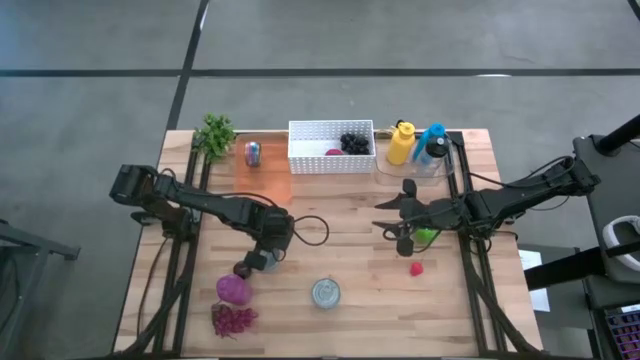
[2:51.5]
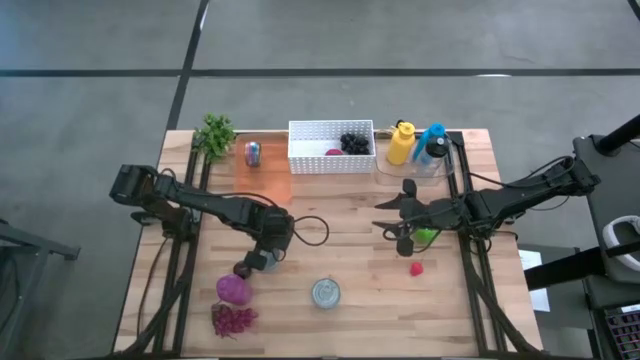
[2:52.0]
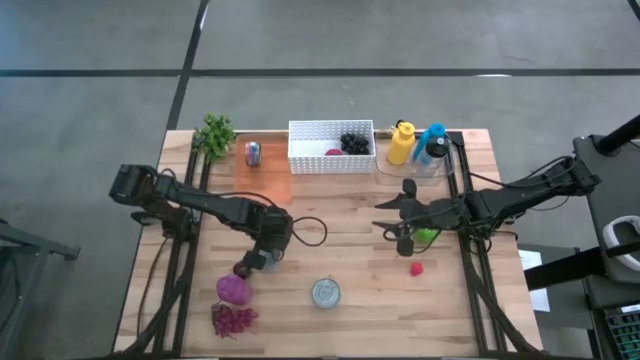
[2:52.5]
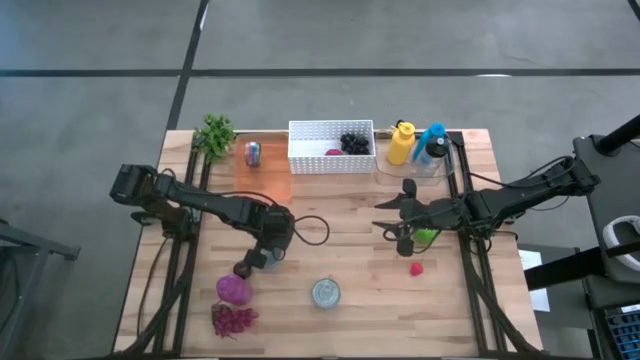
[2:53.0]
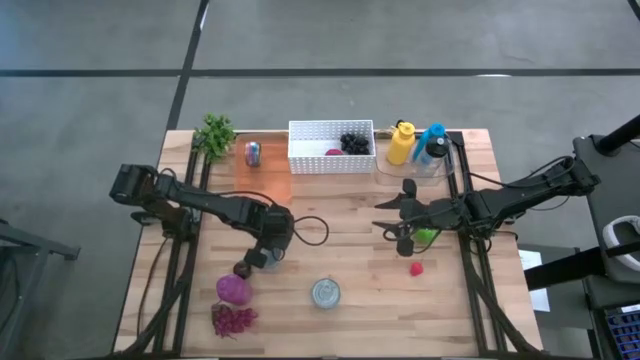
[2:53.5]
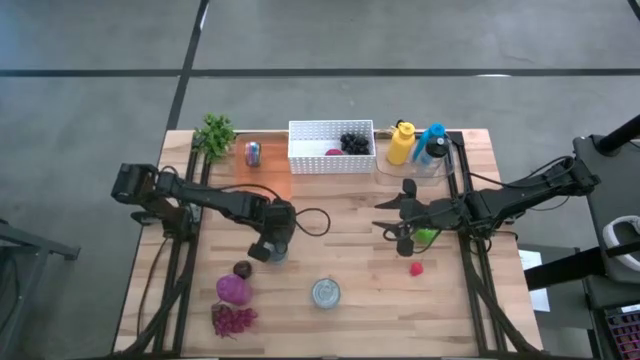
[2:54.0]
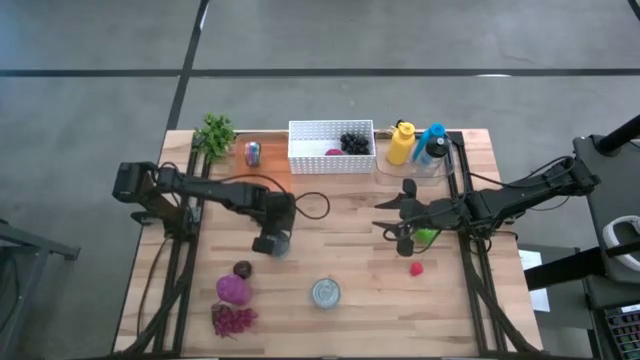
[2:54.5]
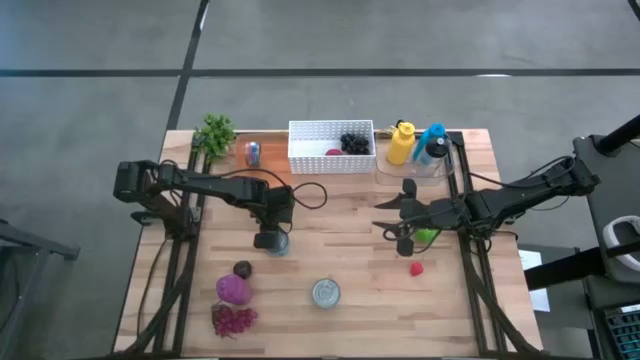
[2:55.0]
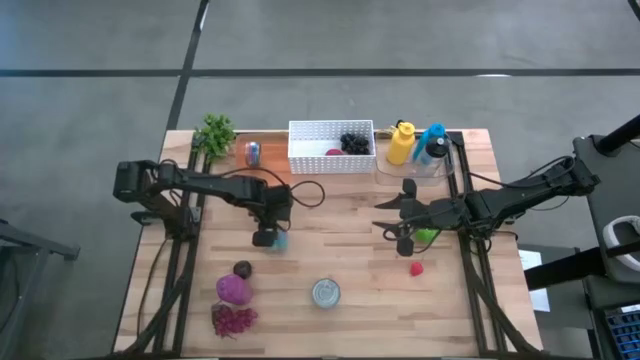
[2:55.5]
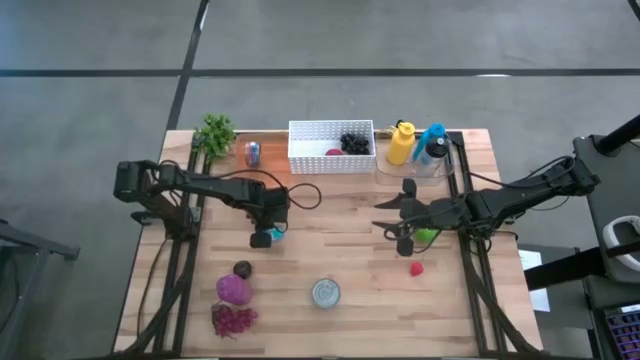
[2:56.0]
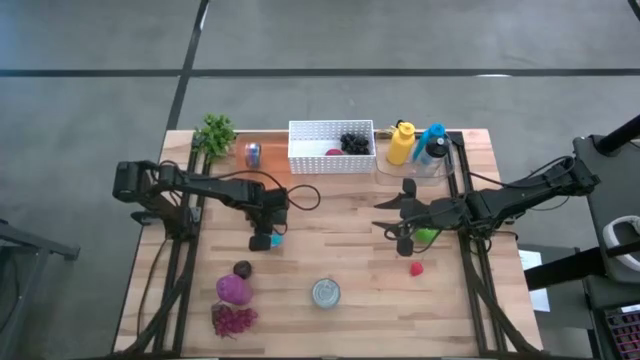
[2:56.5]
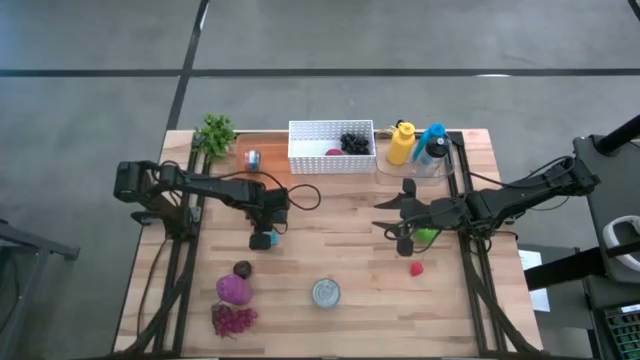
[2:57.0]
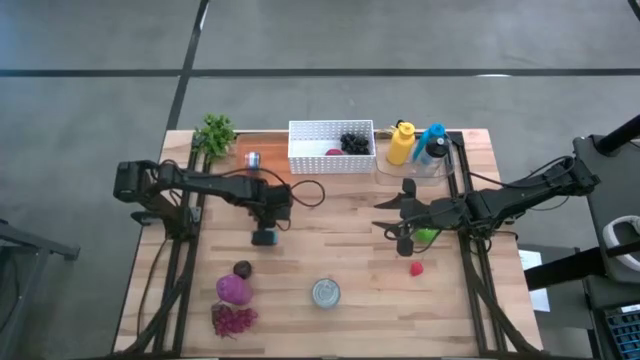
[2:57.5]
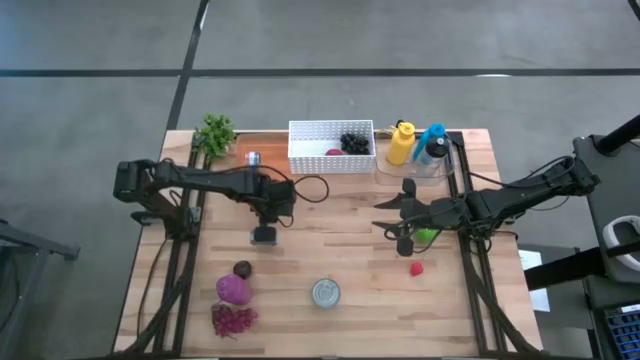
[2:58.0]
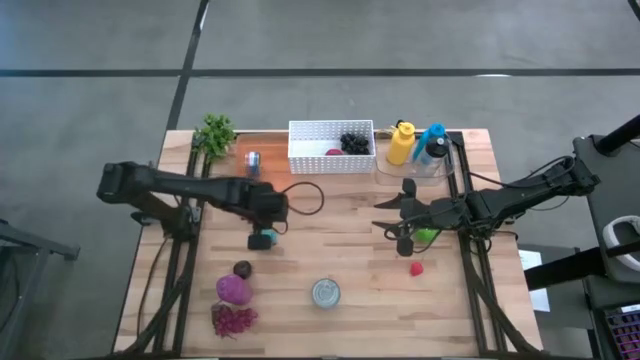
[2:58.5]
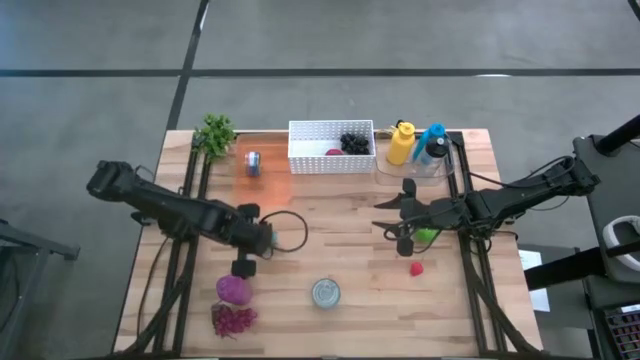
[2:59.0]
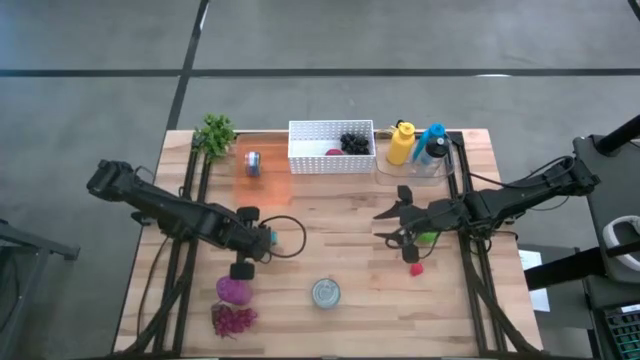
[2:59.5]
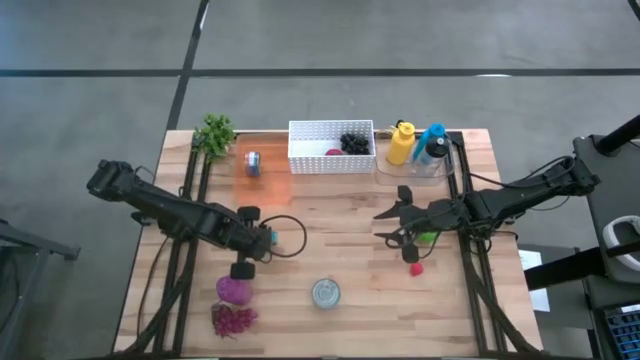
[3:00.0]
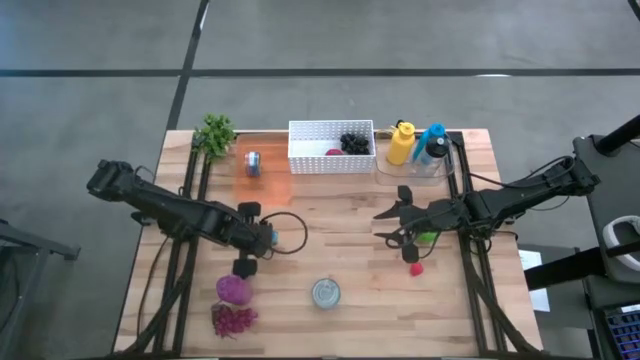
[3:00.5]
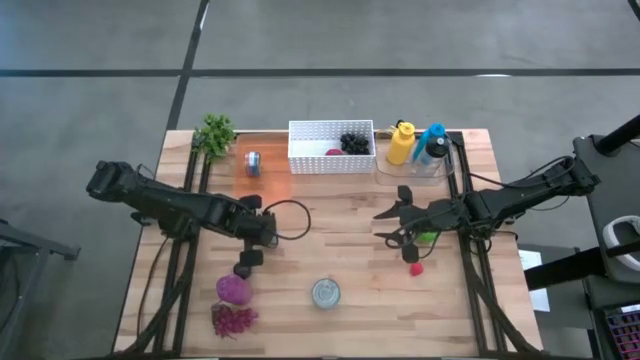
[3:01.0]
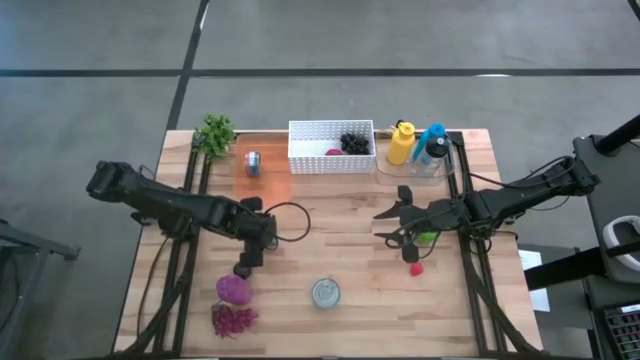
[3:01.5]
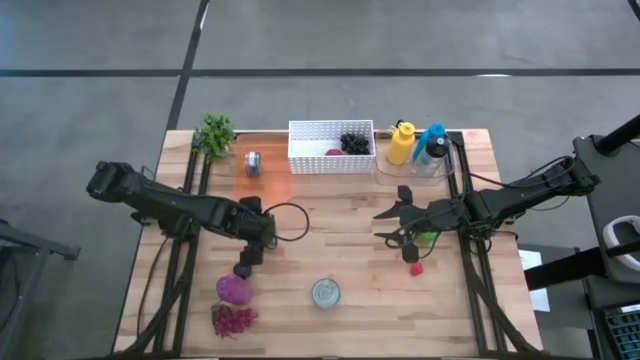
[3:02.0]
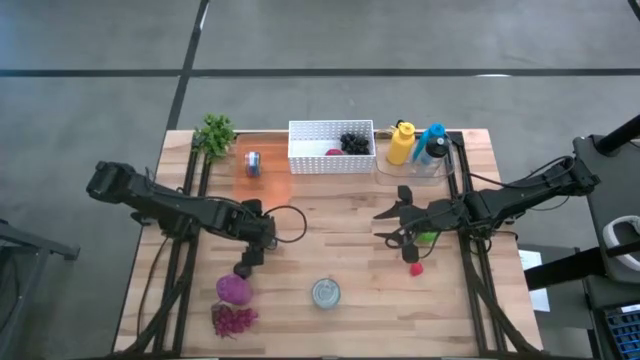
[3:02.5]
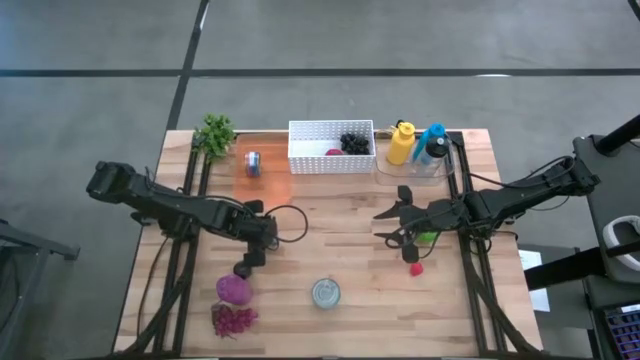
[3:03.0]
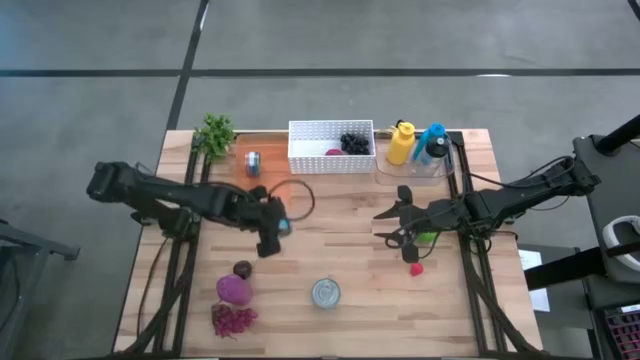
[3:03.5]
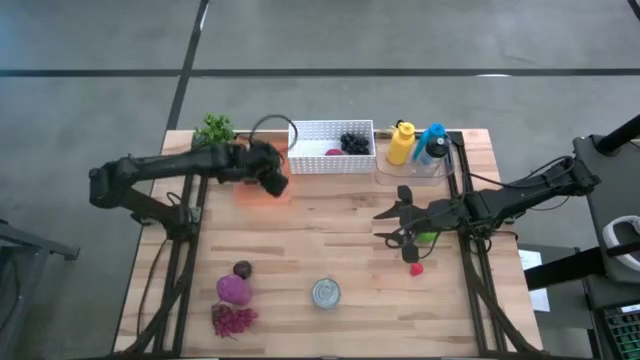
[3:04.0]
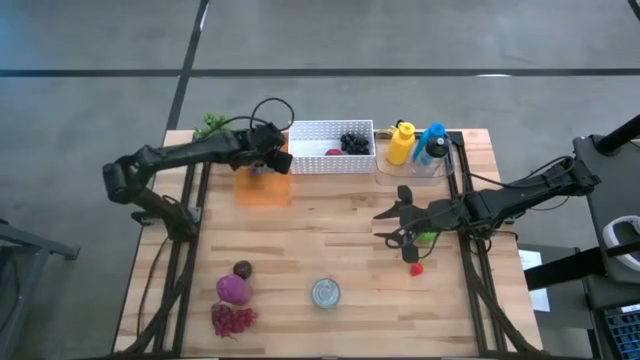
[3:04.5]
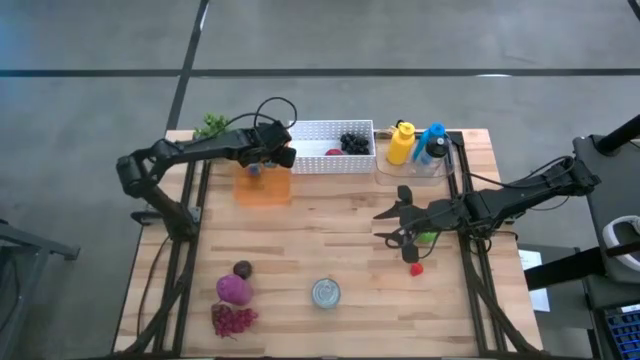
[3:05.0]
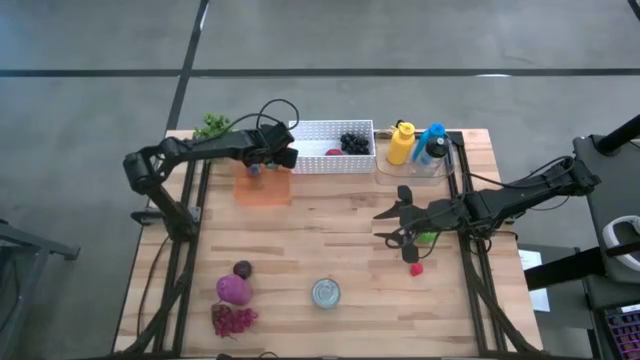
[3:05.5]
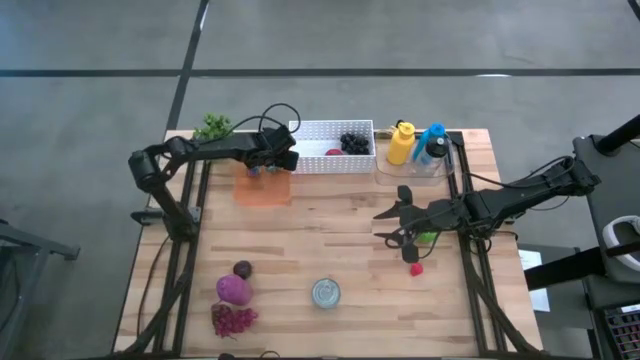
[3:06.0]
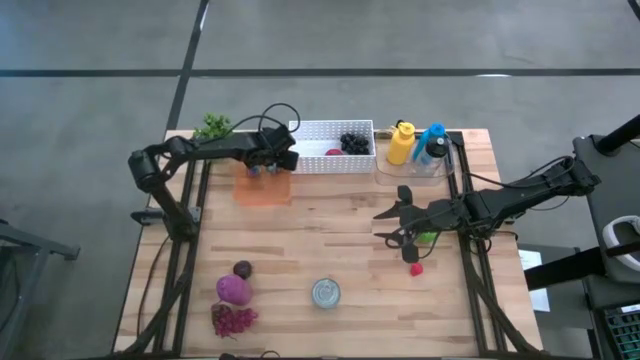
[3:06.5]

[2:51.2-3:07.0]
Task: Pick & Place Food Item
Put the yellow-blue tuna can into the orange bin

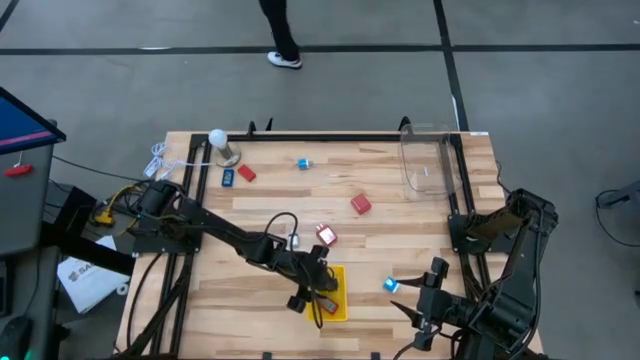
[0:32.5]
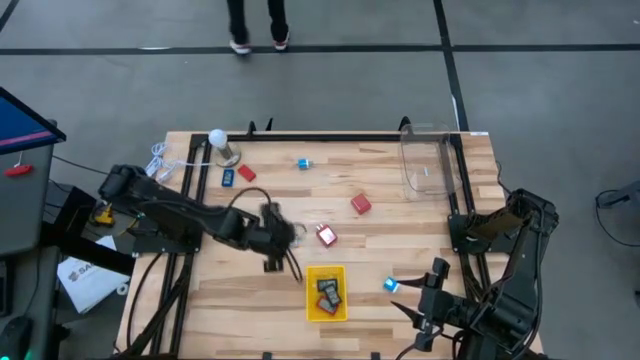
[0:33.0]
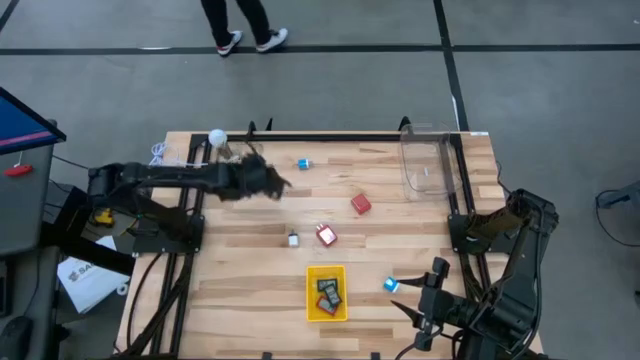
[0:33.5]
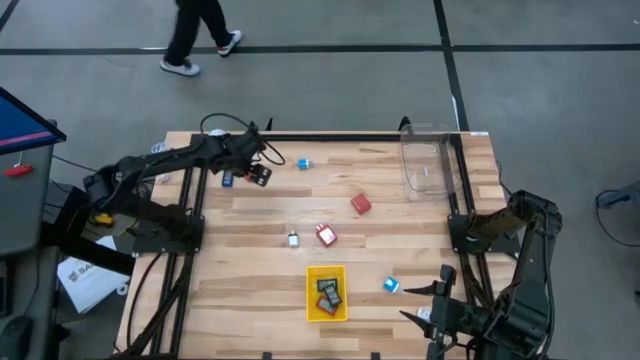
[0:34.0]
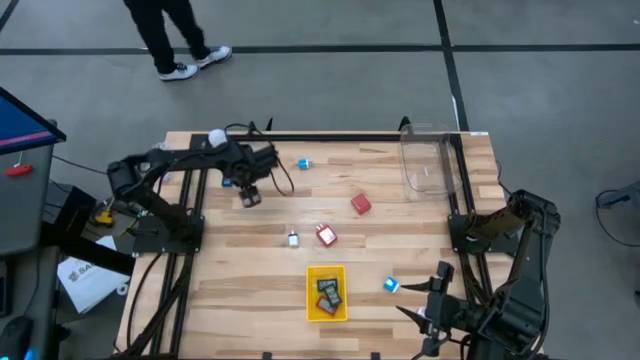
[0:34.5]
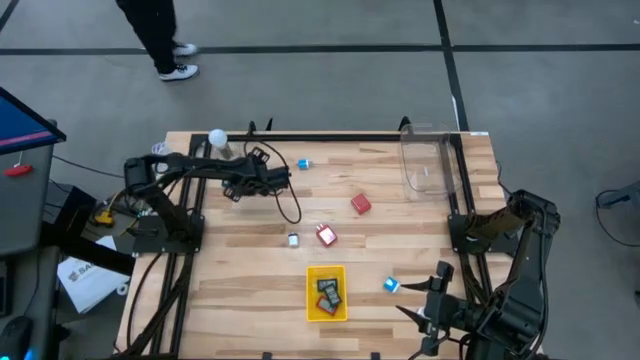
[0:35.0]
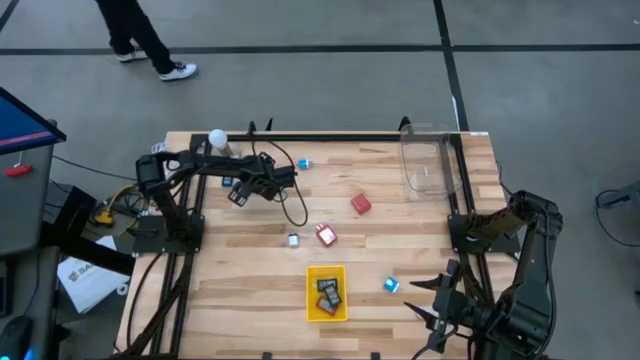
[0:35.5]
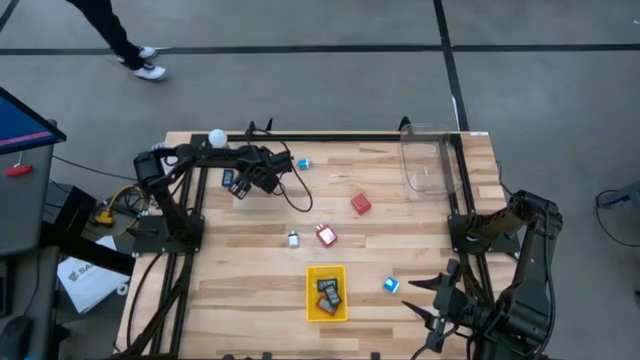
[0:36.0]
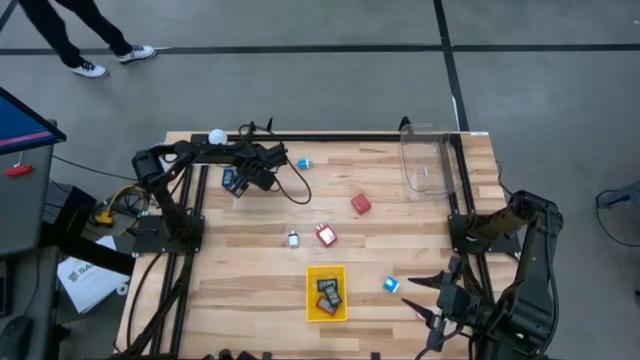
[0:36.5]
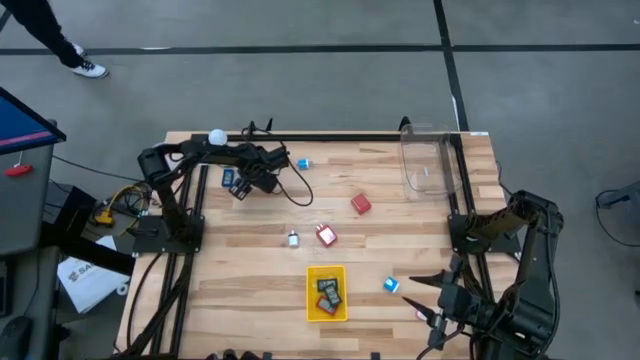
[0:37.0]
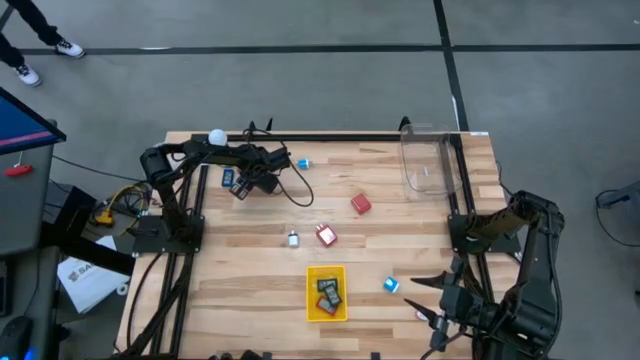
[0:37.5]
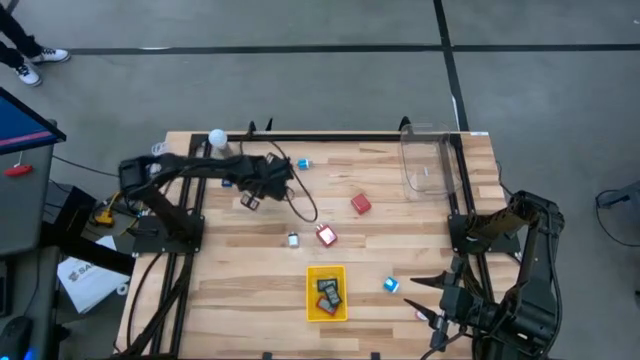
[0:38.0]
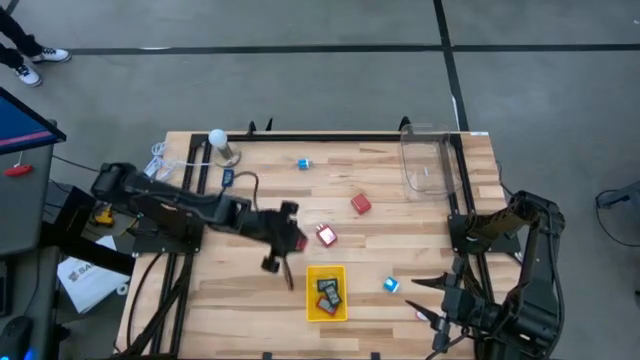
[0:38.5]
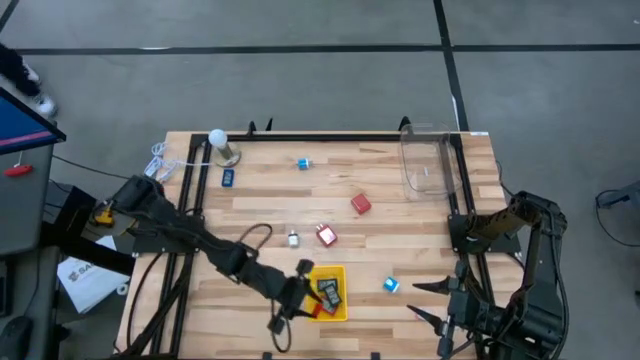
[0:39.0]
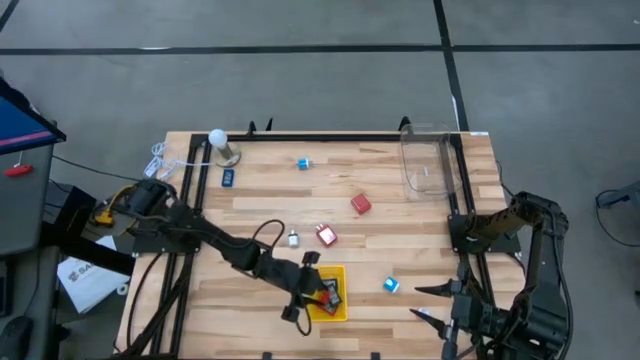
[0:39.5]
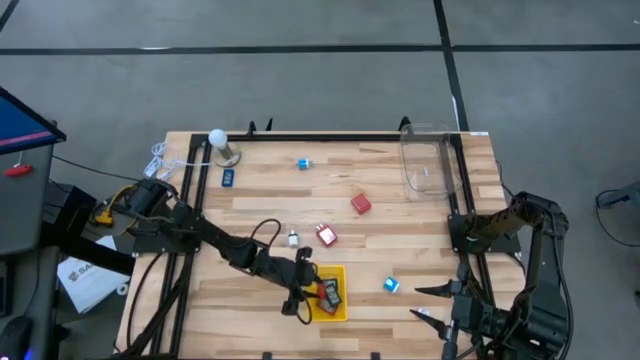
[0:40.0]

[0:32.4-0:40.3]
Task: Pick & Place Office items
Put the red digital timer into the yellow bin
